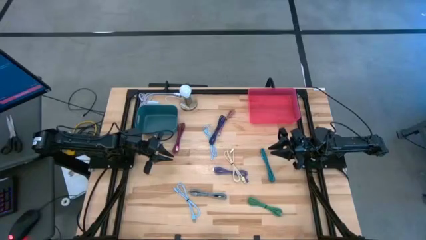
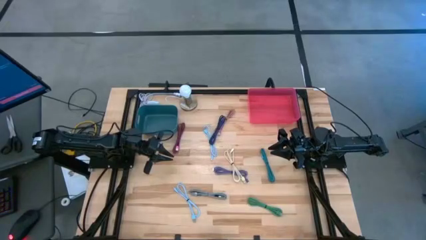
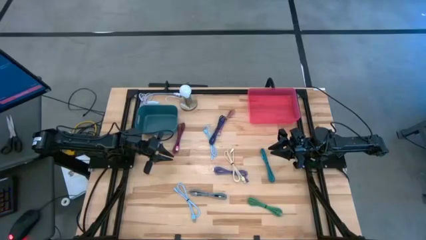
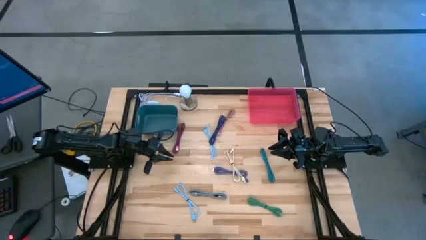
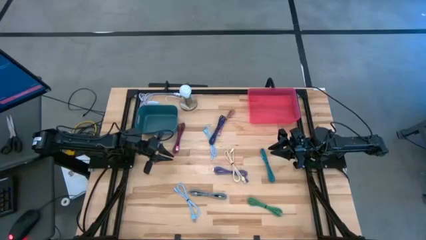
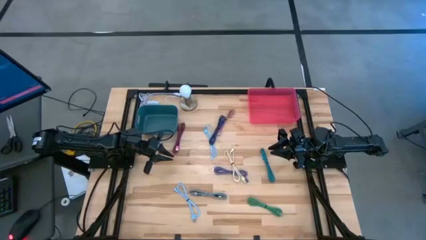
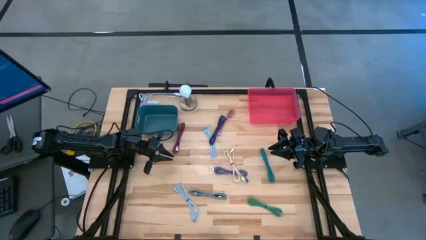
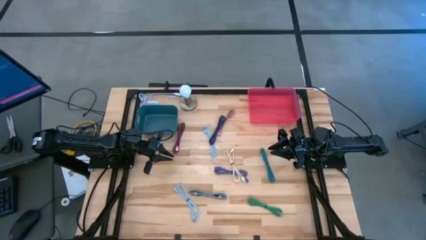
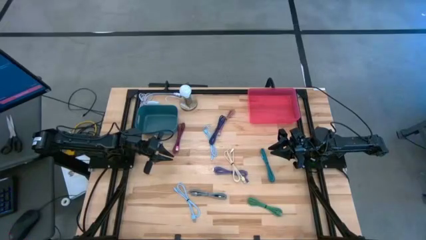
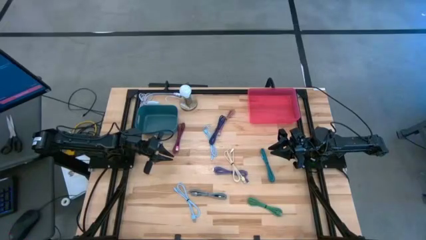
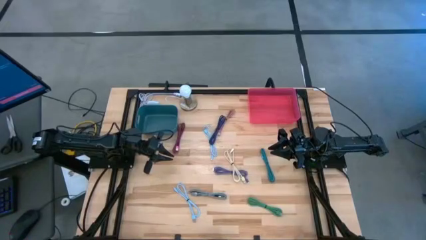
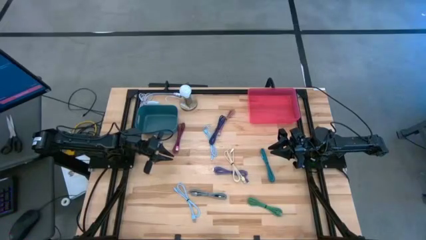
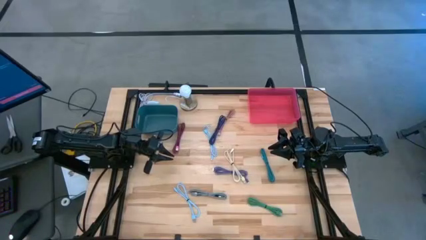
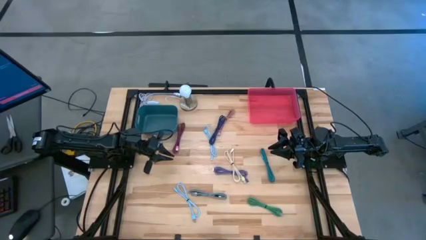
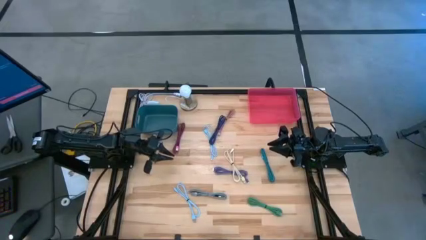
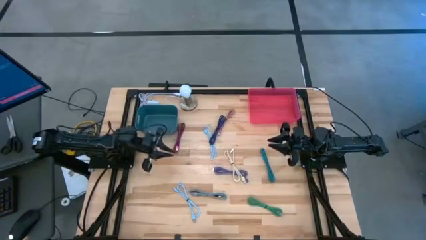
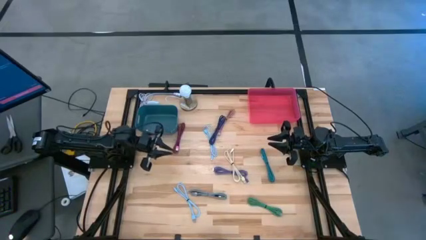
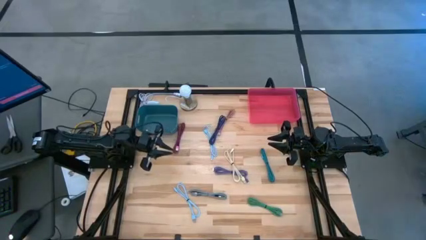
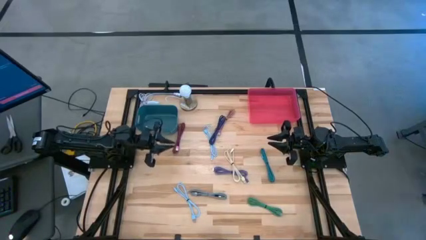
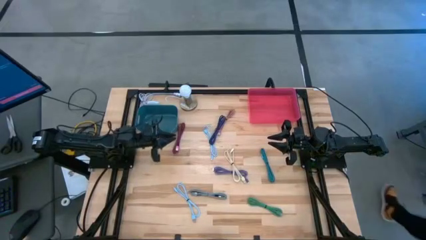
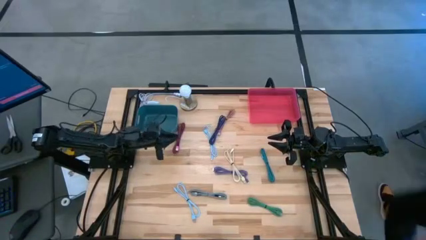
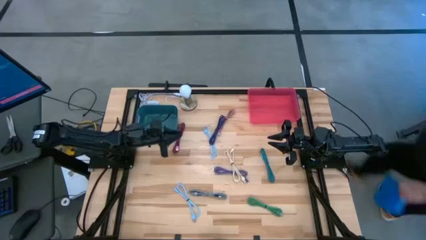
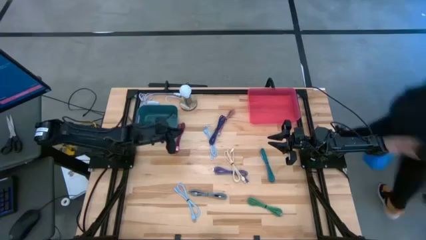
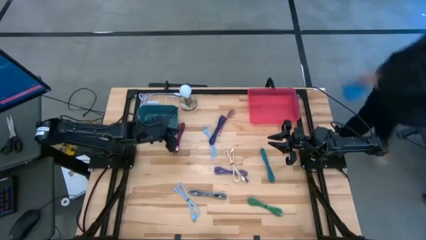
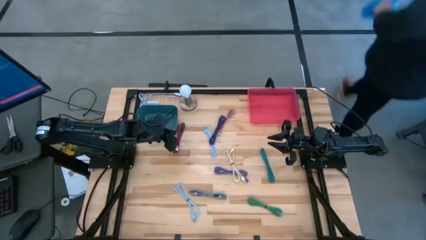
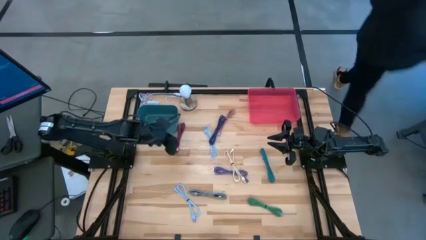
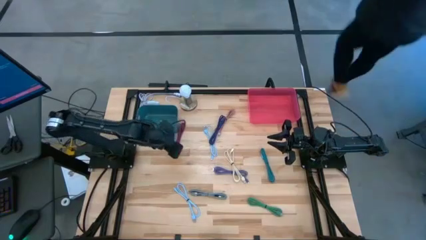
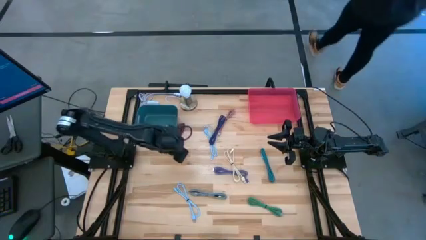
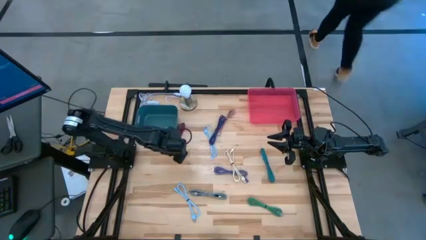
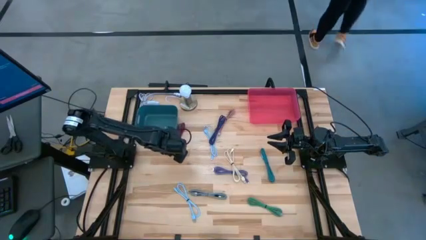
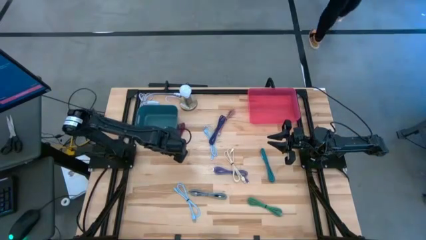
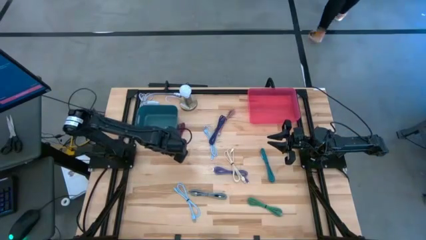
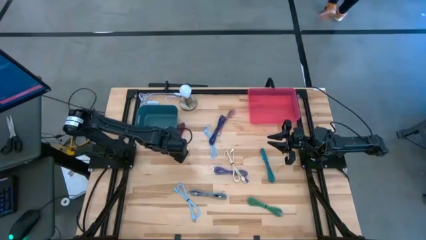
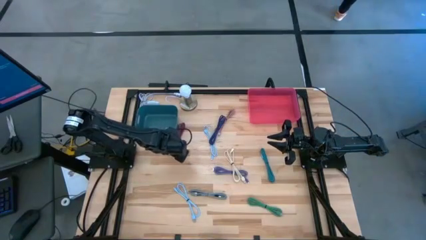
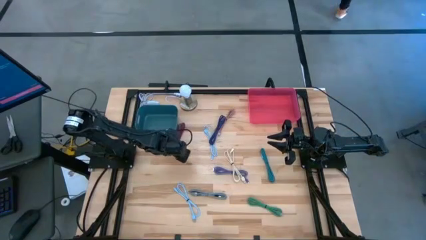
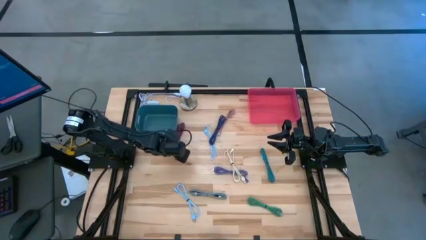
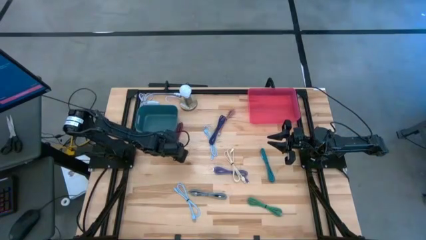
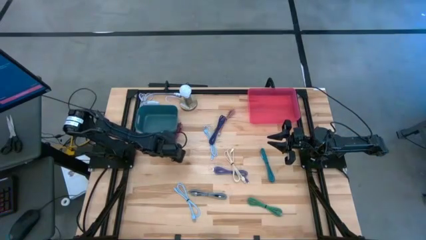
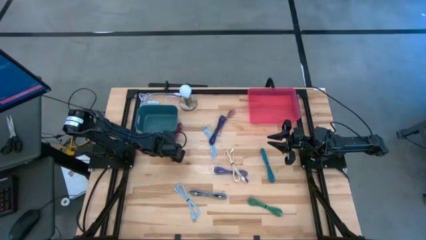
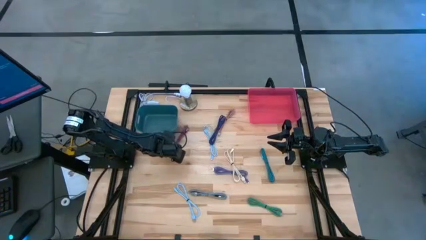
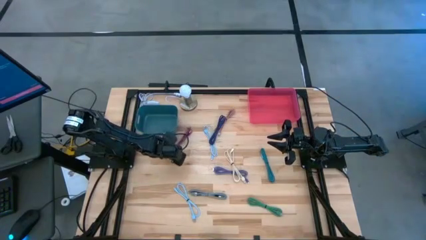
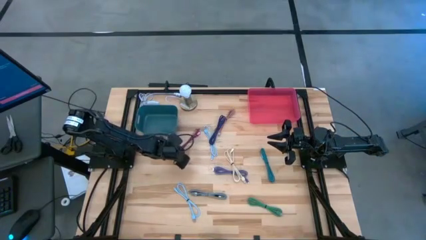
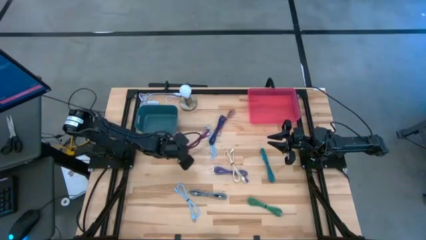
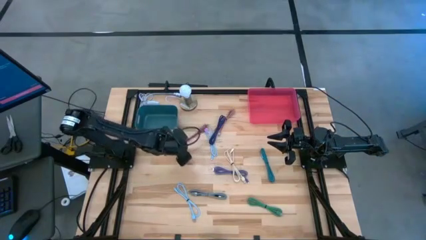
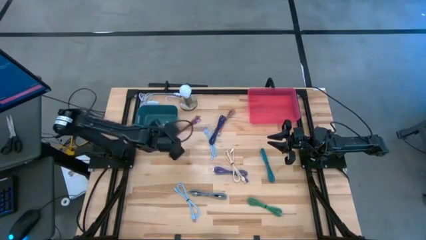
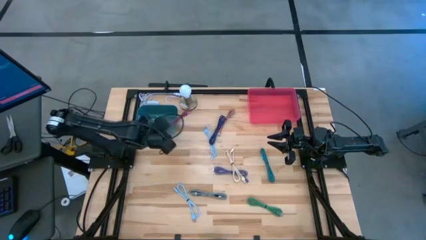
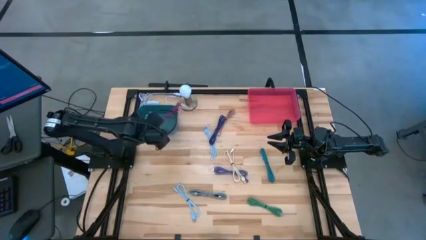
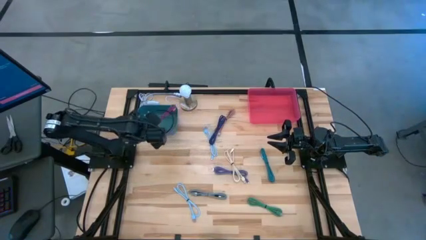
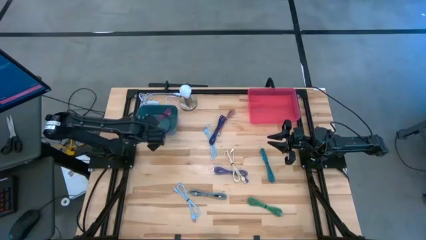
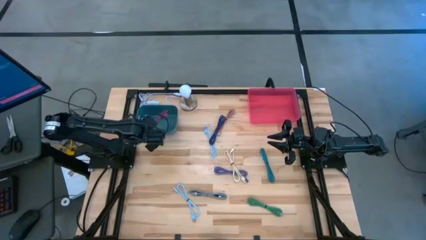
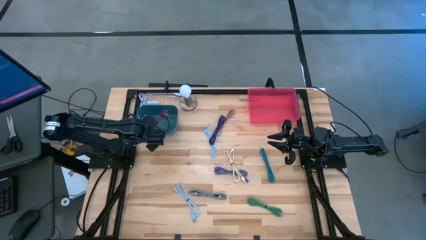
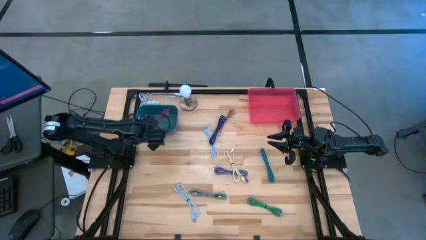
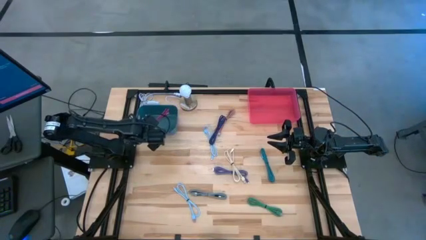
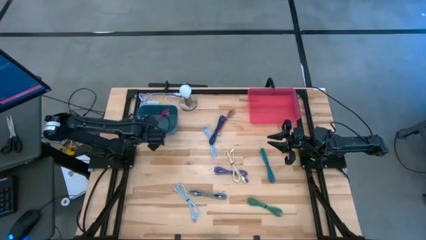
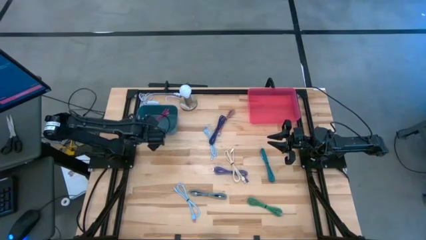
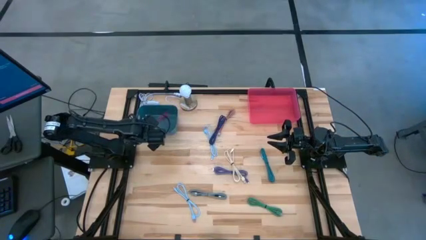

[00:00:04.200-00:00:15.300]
Task: Pick & Place USB Port
Put the striped red and black charger cable into the blue bin

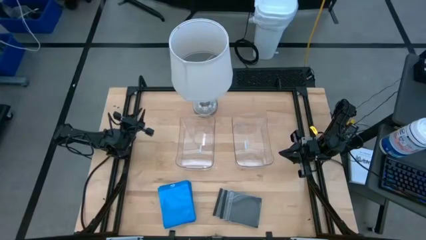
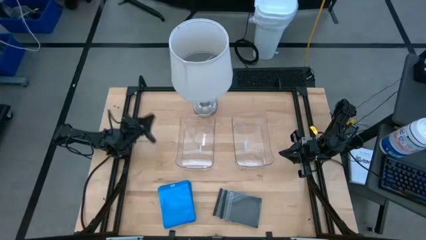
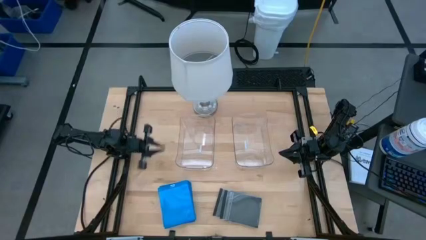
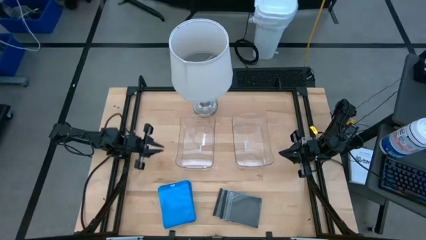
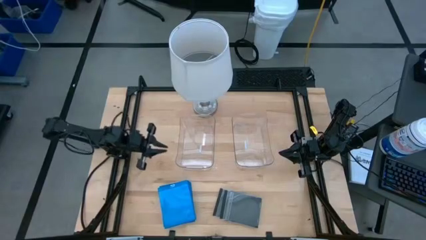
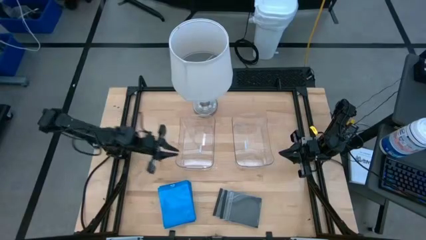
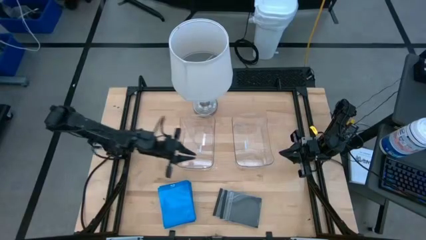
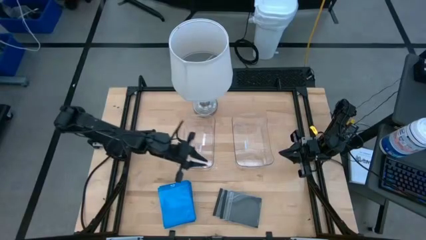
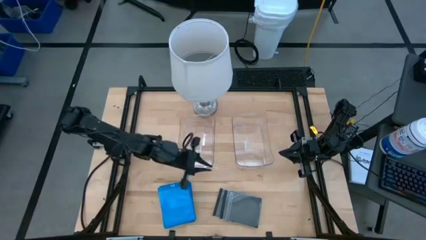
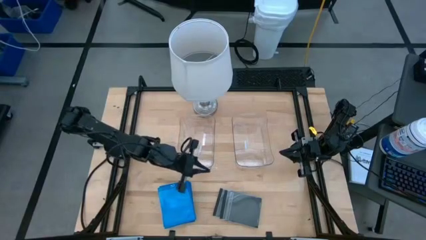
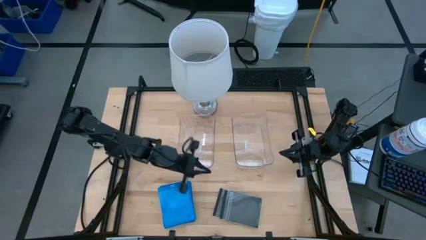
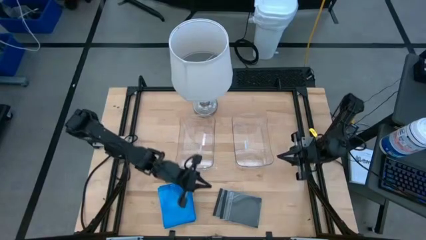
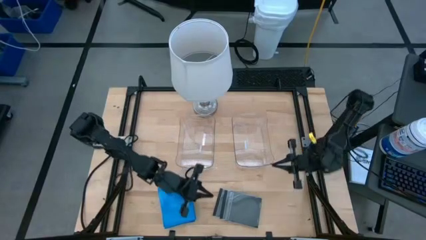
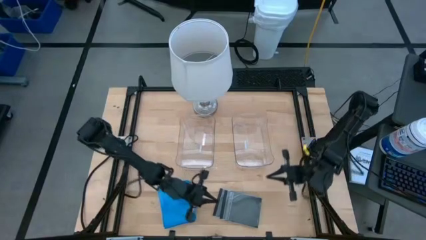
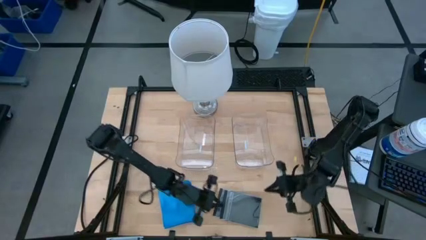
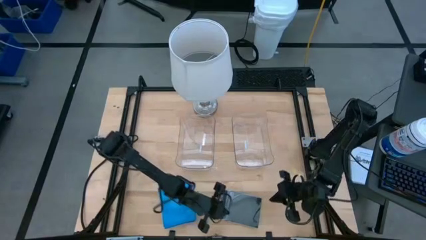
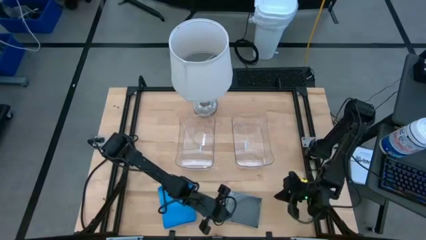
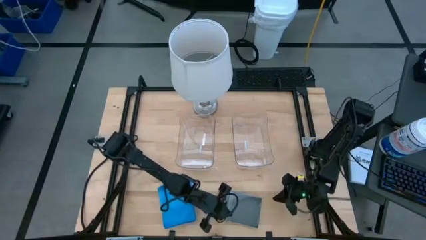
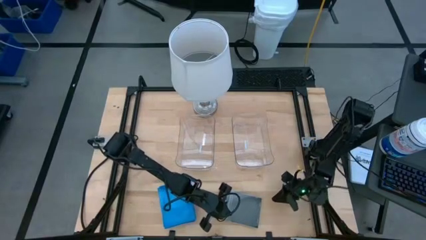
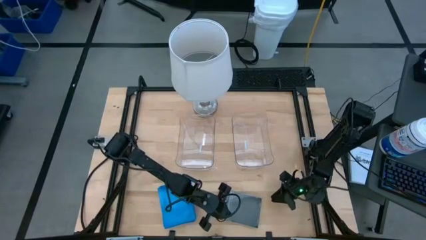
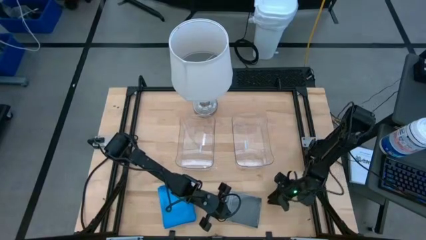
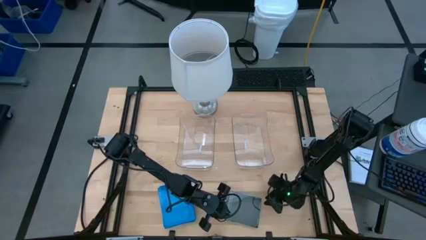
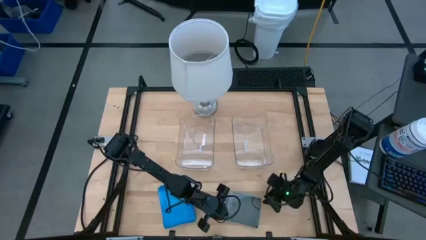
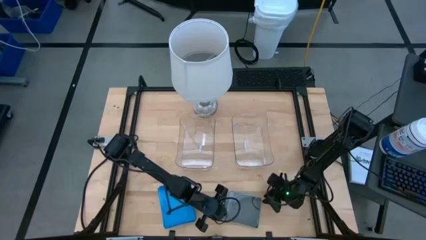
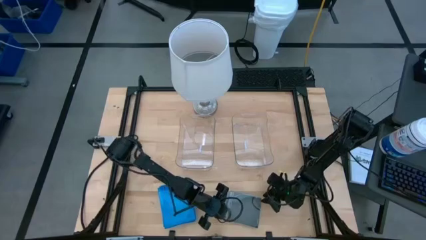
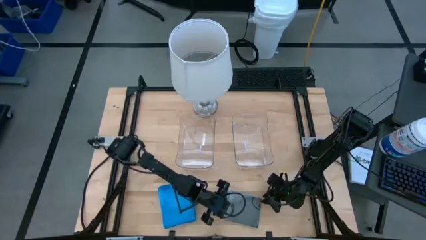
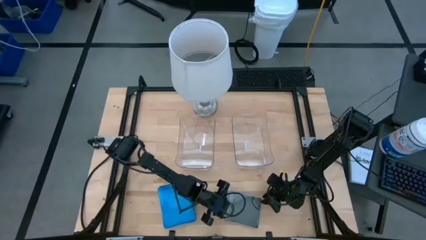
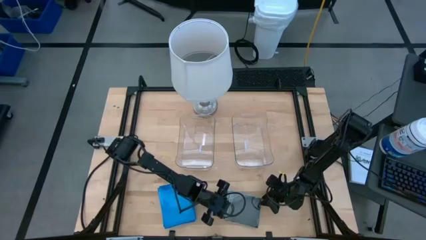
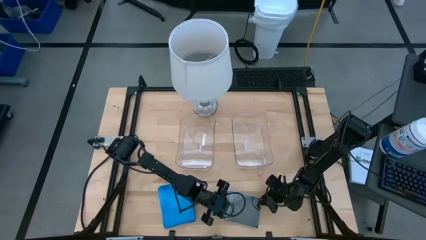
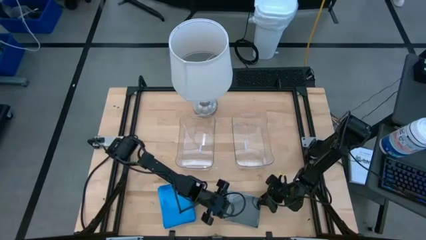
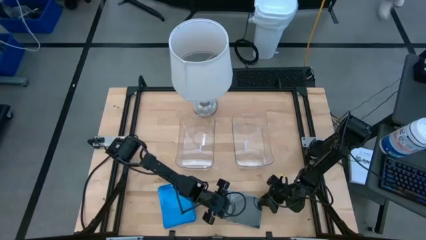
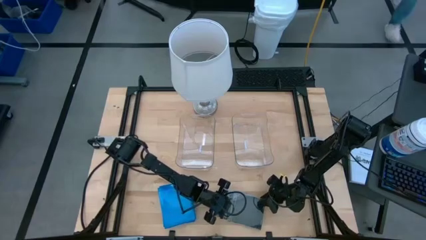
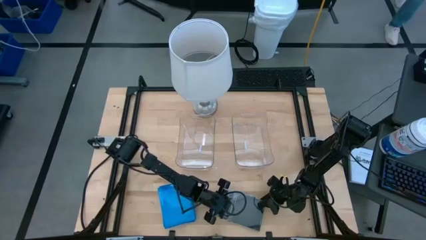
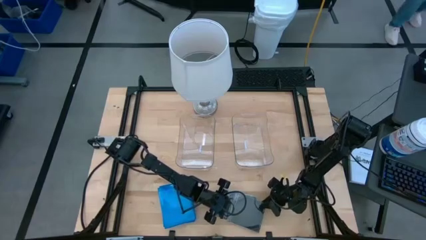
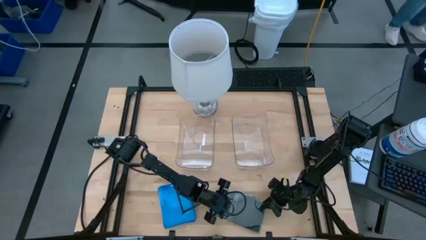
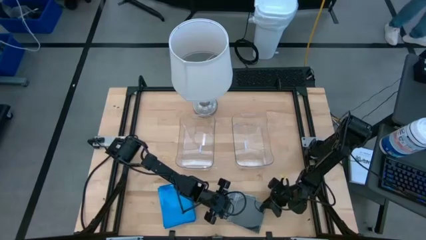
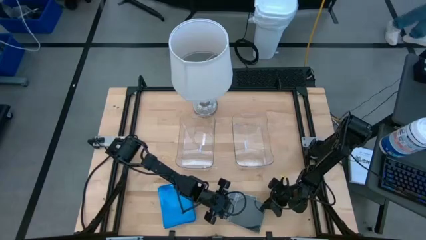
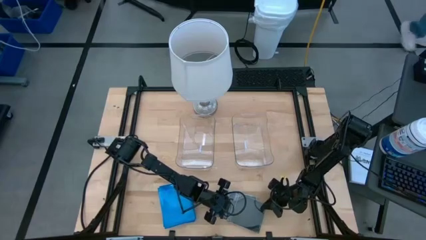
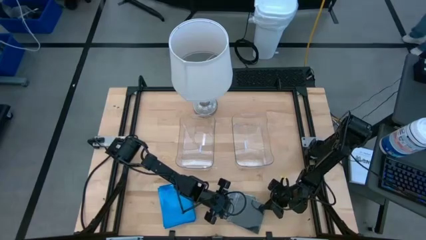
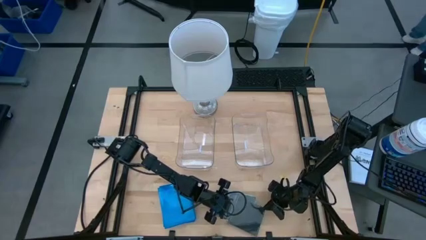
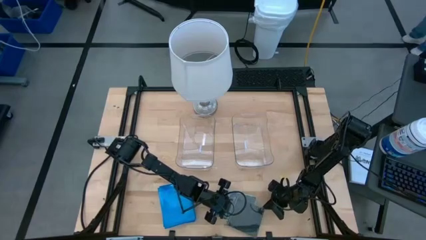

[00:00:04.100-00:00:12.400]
Task: Pick & place jewel cases by type
Put the black CD case into the right transparent bin
